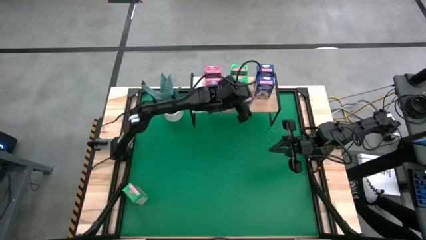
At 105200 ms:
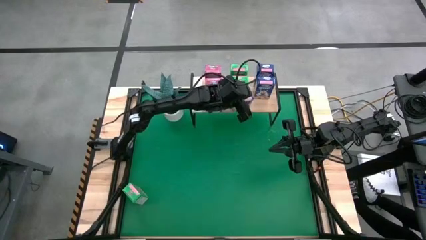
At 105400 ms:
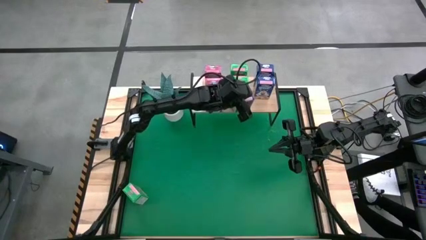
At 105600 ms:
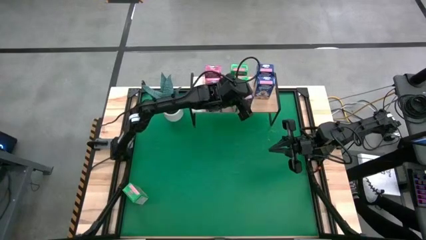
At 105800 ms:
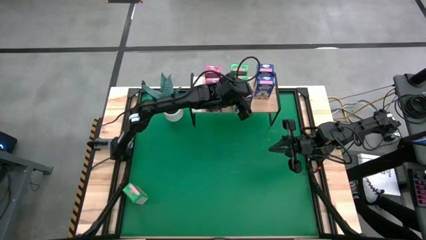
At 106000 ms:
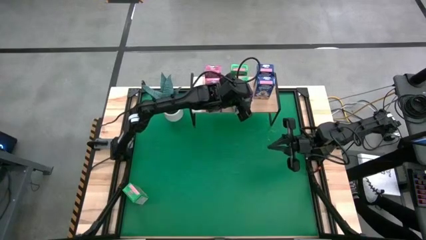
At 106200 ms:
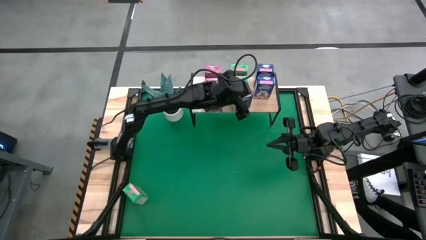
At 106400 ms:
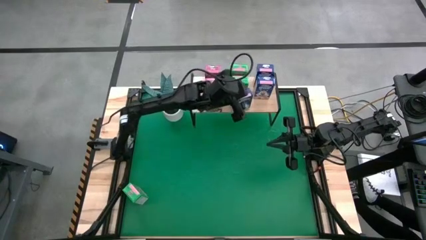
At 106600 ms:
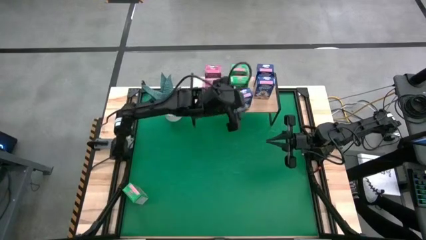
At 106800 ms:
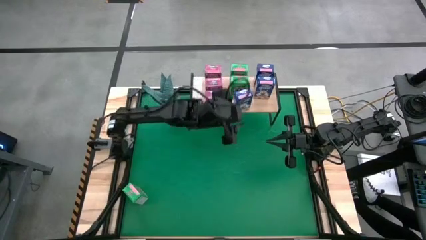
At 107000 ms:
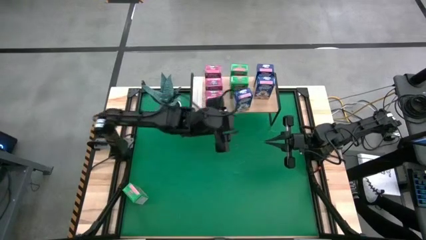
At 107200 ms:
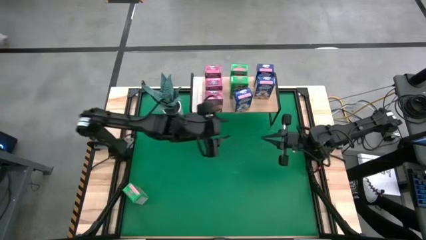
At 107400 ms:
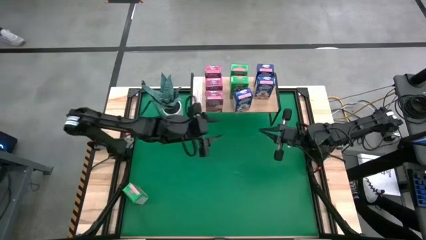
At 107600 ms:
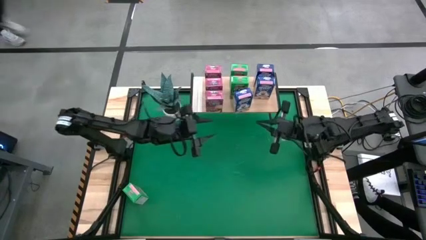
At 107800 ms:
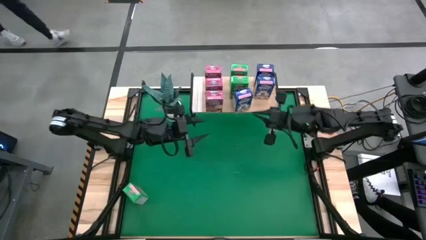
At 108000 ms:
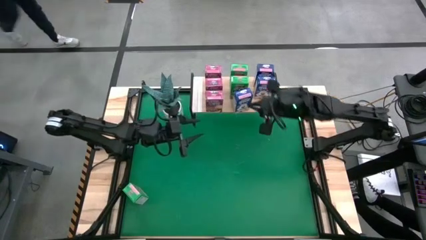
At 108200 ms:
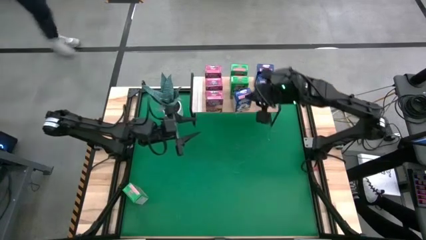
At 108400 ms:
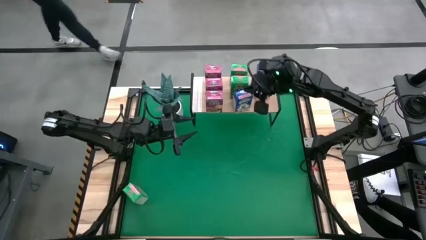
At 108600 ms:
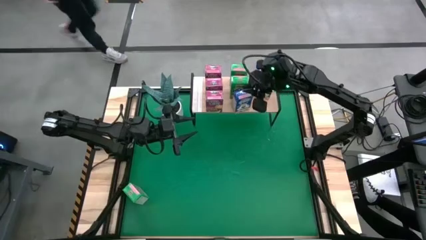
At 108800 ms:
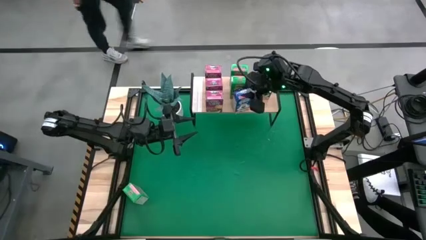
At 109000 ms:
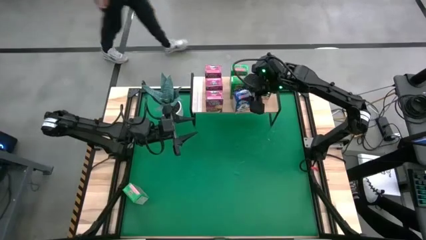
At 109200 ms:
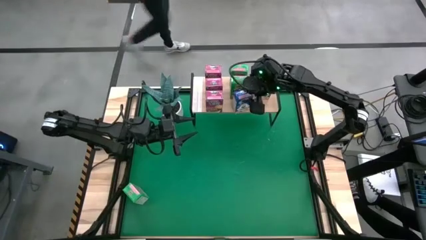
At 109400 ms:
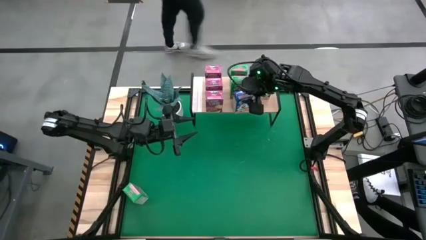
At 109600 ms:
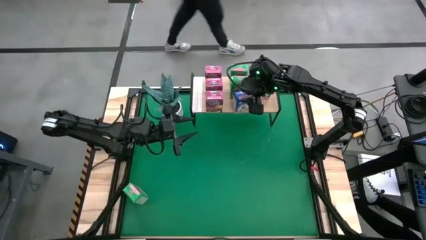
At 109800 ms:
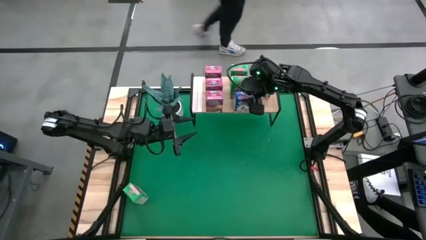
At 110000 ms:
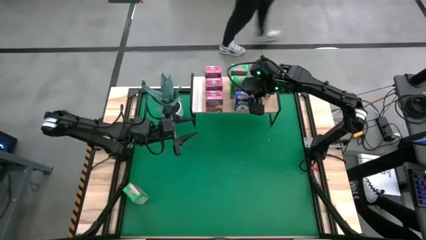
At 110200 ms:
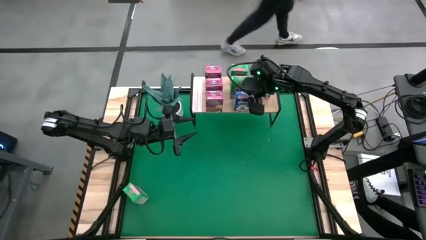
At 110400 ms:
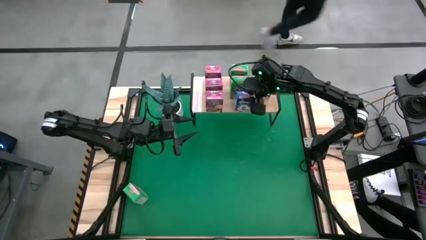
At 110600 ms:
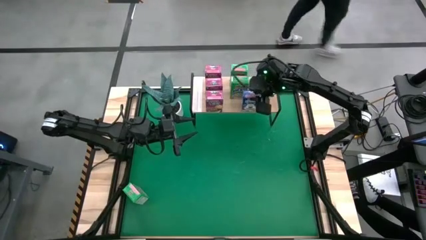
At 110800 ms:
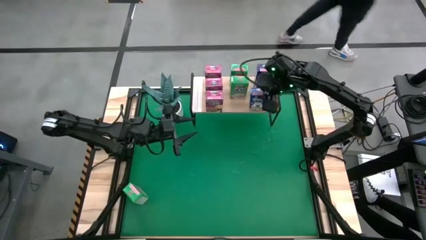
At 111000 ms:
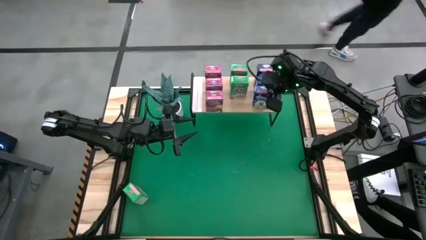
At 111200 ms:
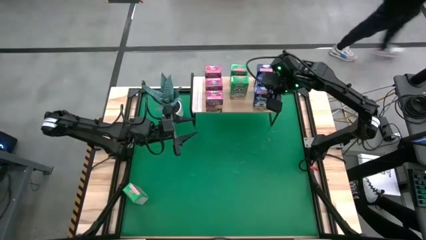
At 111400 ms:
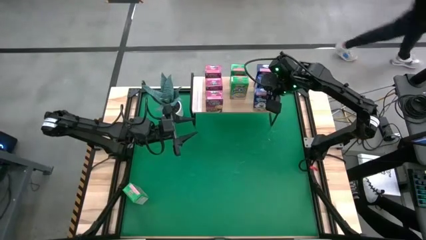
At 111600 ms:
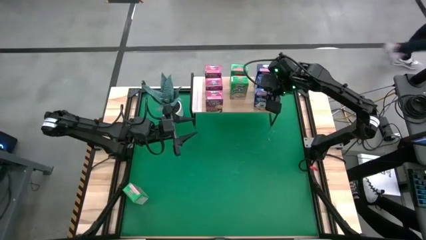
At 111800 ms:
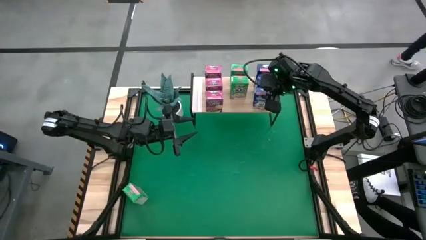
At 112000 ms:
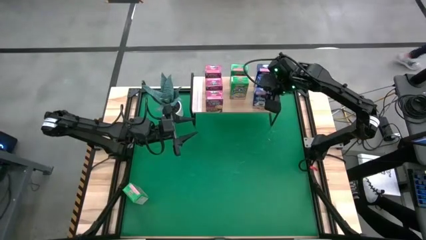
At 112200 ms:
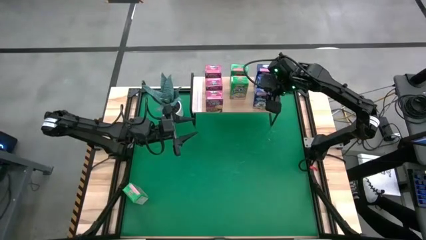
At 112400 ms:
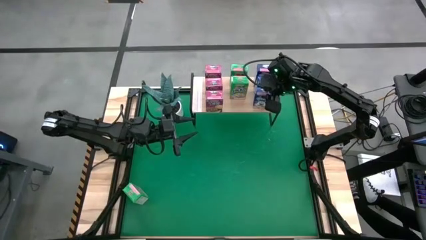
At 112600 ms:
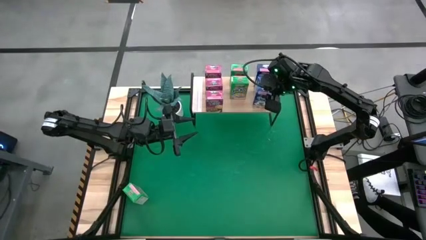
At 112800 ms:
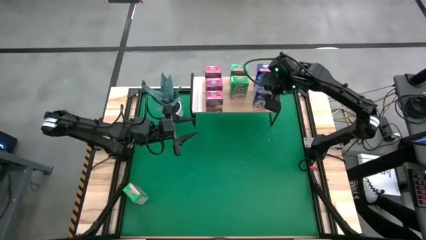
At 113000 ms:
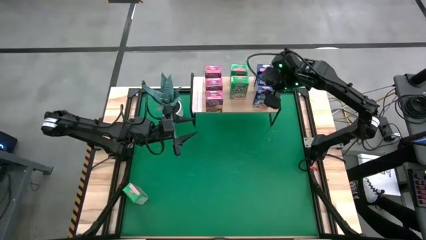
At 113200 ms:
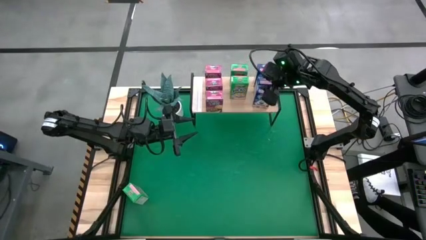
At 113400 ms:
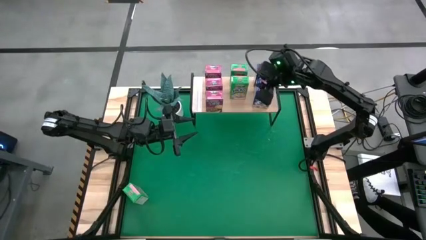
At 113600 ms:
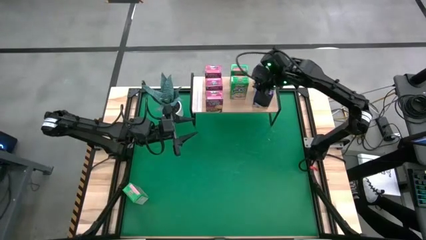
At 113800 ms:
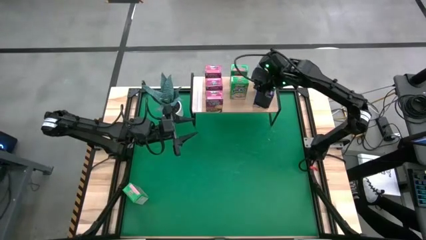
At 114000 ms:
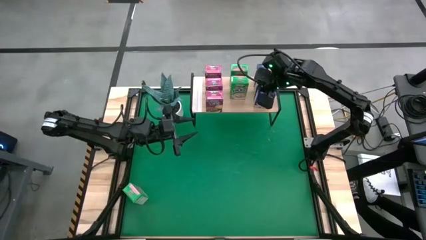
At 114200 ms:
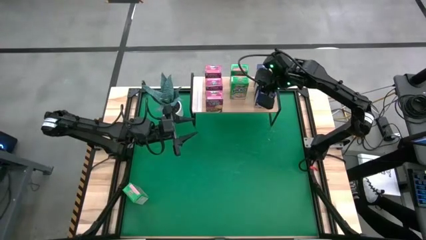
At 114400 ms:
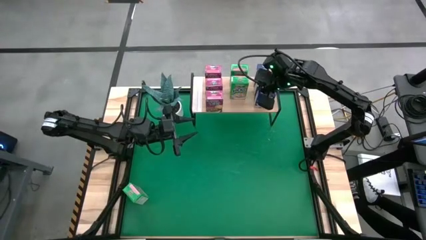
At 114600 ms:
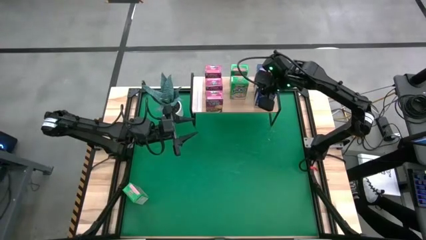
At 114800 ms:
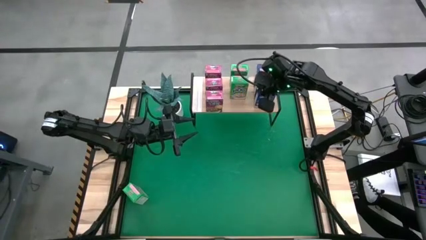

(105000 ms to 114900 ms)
Task: Stack cereal on shelf
Put the blue cereal box aligned with the other blue cereal boxes on the shelf
